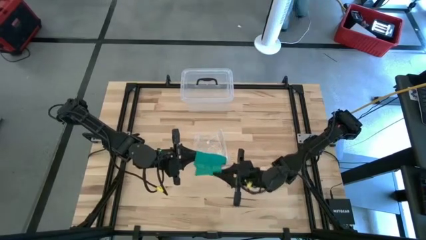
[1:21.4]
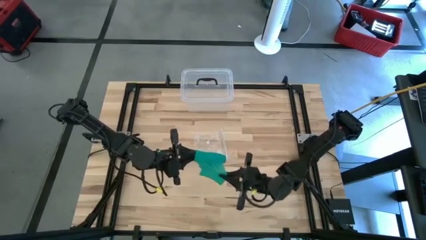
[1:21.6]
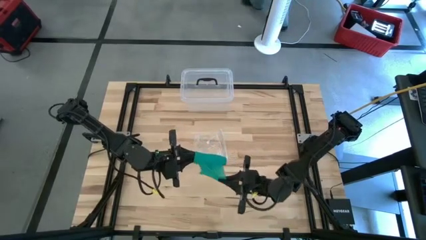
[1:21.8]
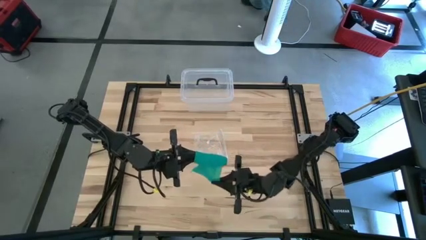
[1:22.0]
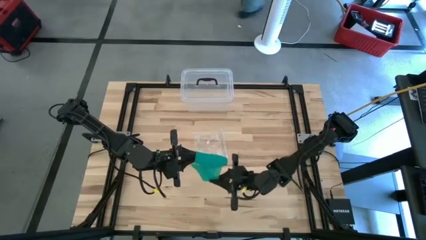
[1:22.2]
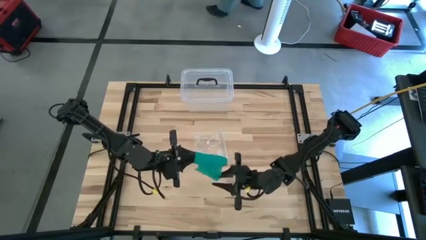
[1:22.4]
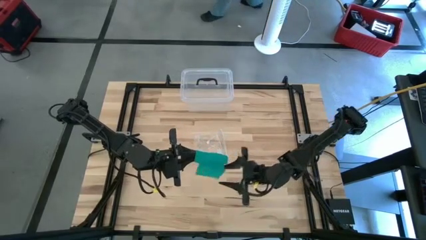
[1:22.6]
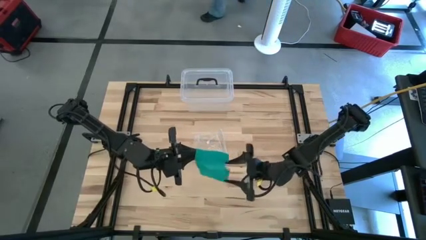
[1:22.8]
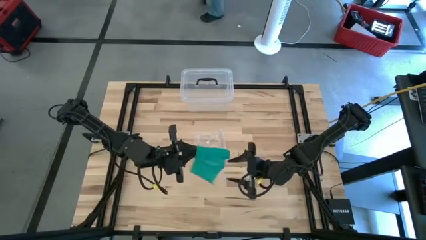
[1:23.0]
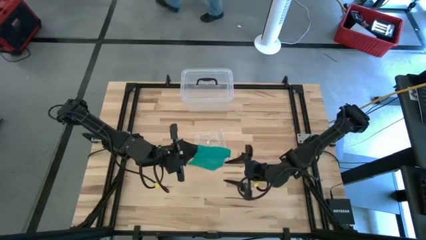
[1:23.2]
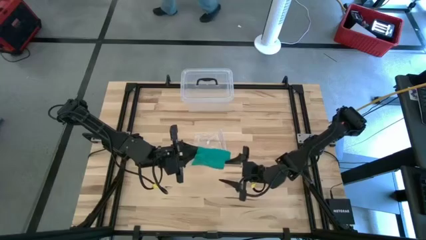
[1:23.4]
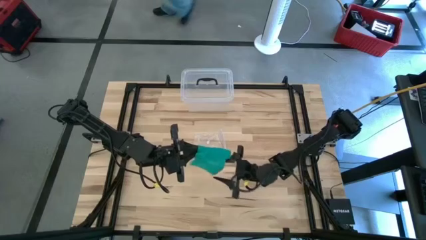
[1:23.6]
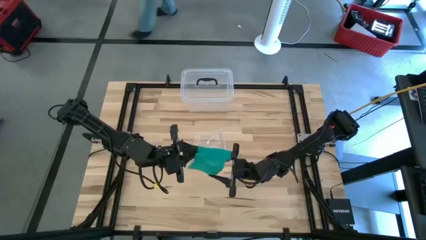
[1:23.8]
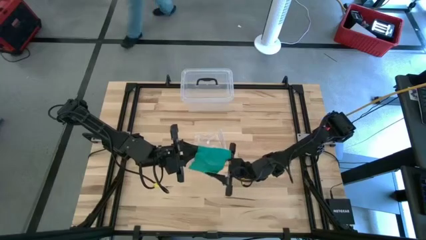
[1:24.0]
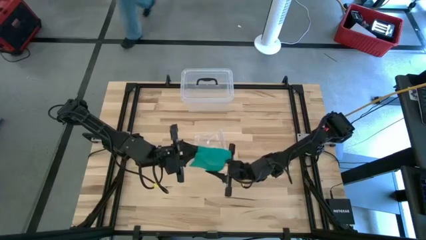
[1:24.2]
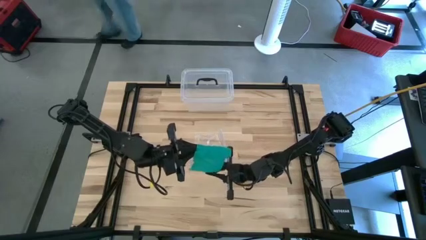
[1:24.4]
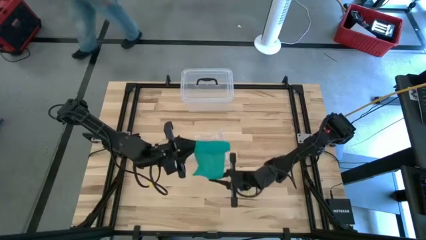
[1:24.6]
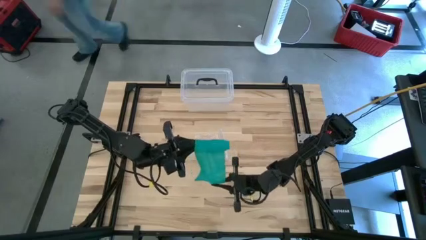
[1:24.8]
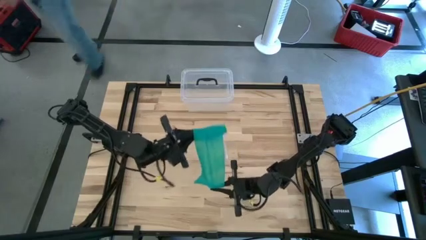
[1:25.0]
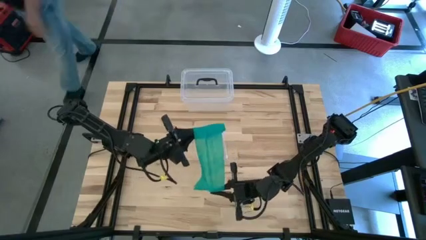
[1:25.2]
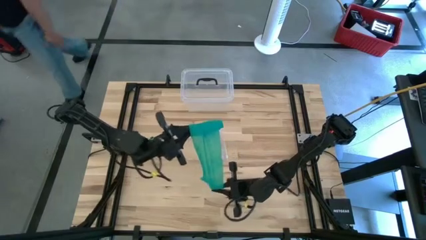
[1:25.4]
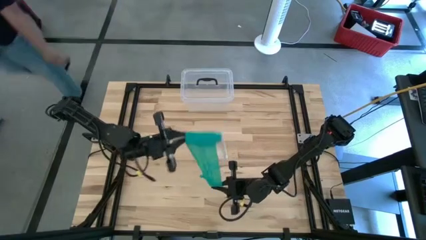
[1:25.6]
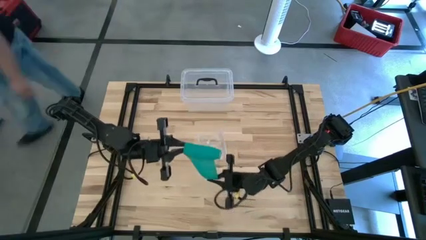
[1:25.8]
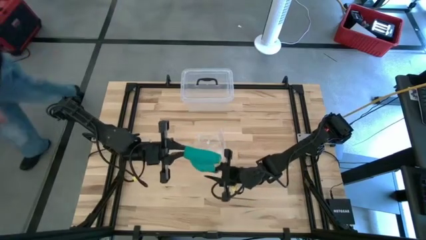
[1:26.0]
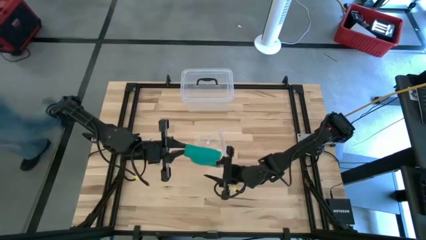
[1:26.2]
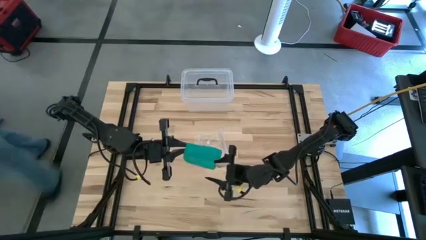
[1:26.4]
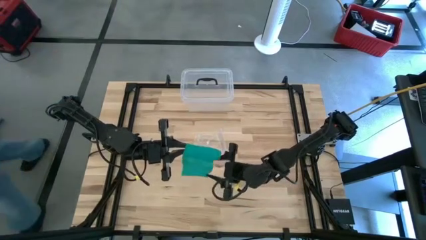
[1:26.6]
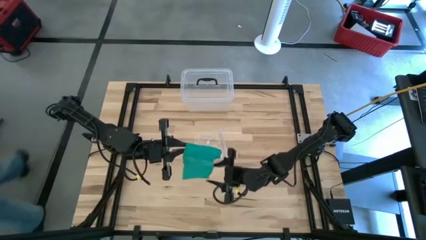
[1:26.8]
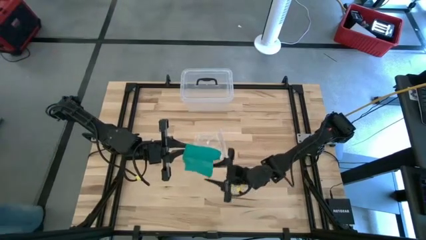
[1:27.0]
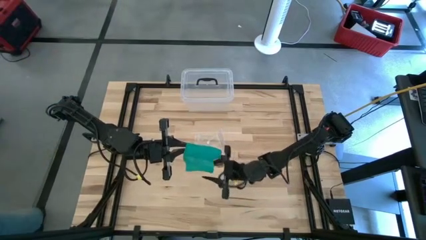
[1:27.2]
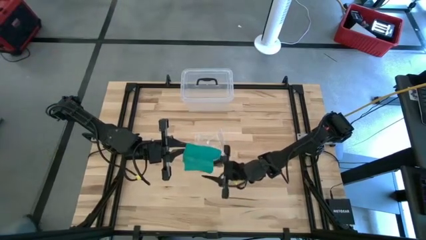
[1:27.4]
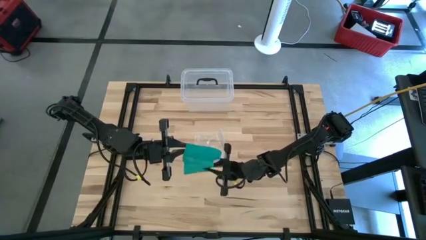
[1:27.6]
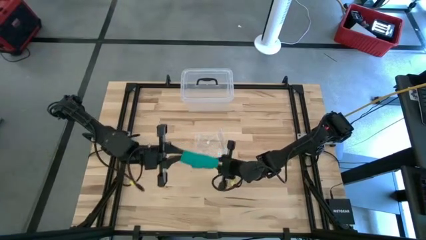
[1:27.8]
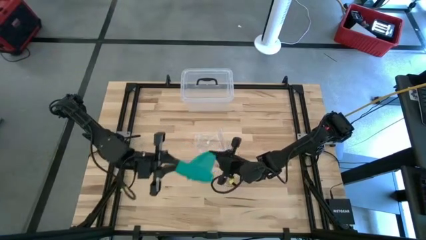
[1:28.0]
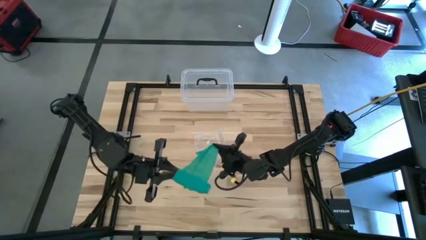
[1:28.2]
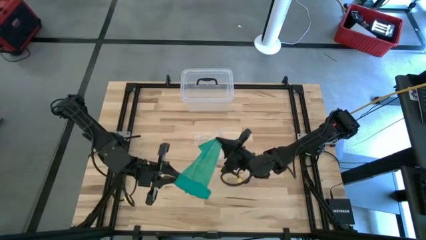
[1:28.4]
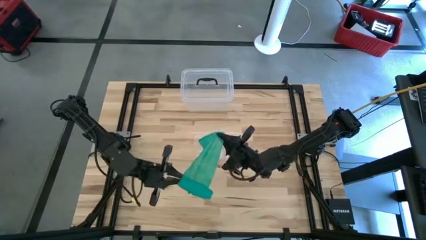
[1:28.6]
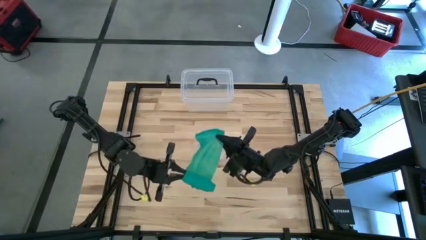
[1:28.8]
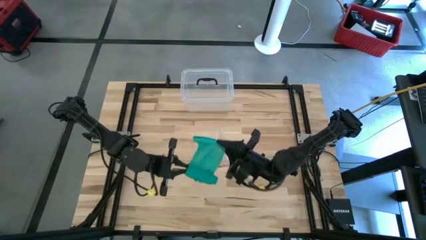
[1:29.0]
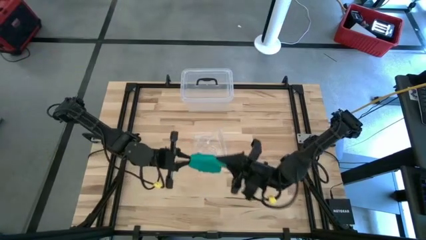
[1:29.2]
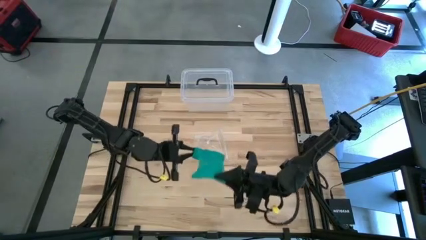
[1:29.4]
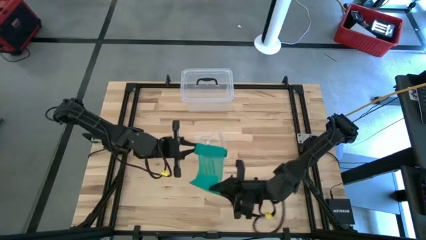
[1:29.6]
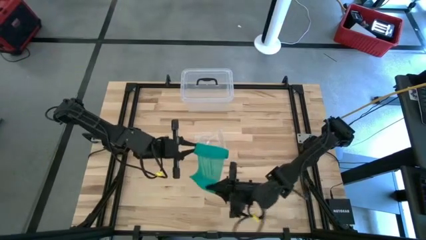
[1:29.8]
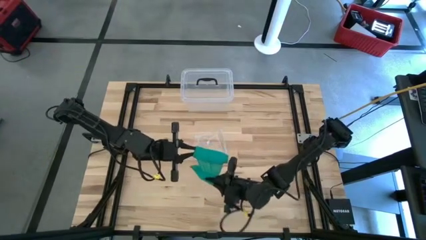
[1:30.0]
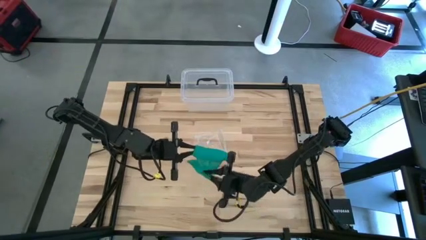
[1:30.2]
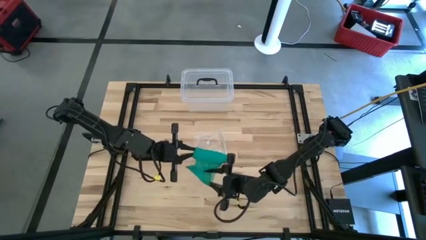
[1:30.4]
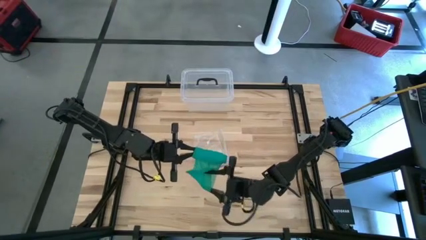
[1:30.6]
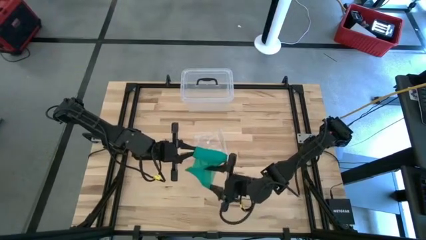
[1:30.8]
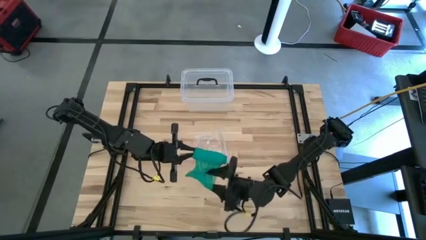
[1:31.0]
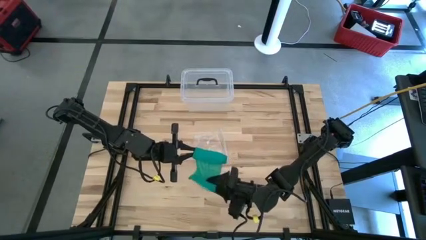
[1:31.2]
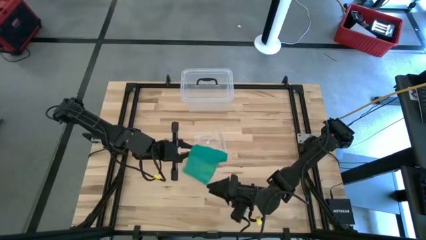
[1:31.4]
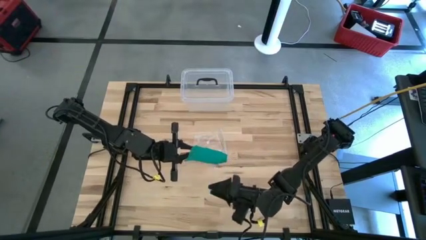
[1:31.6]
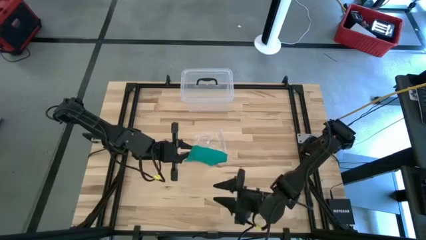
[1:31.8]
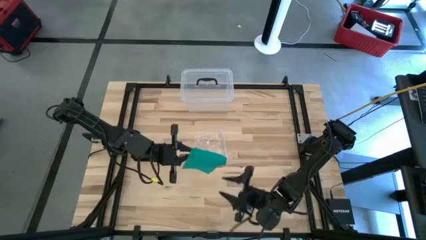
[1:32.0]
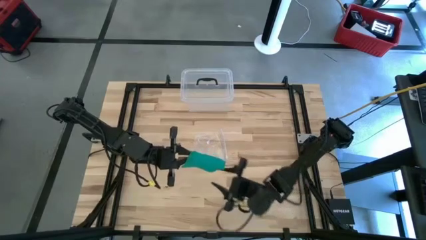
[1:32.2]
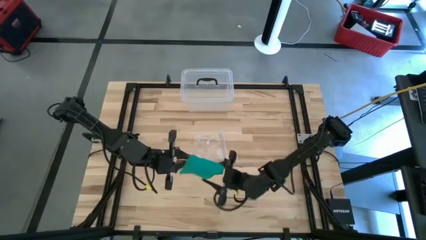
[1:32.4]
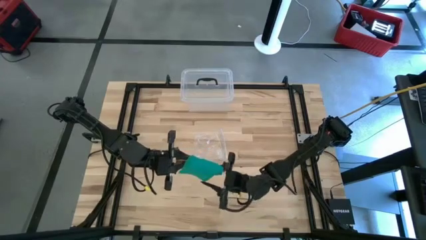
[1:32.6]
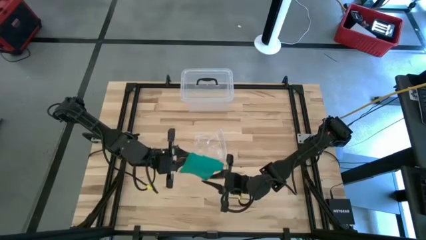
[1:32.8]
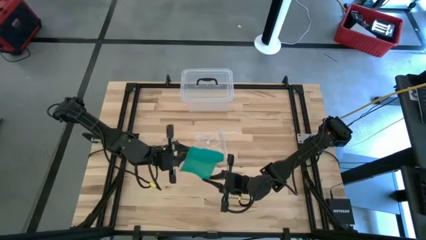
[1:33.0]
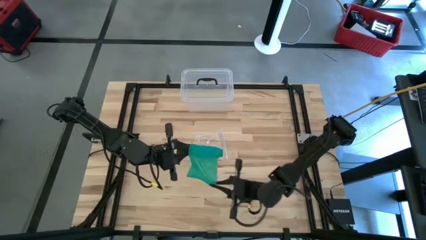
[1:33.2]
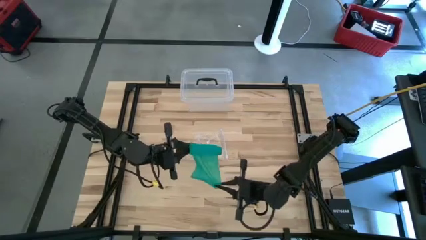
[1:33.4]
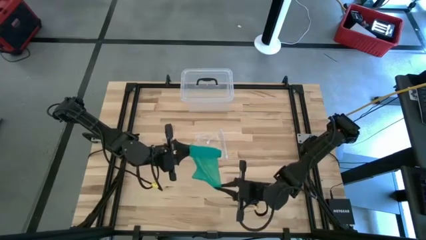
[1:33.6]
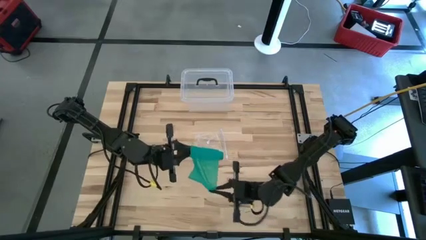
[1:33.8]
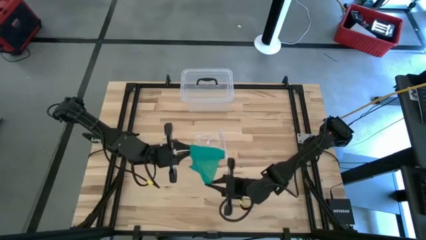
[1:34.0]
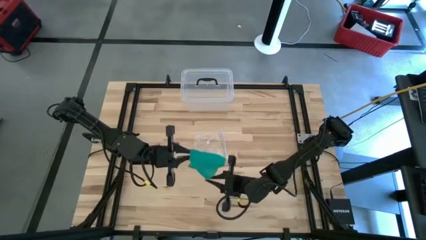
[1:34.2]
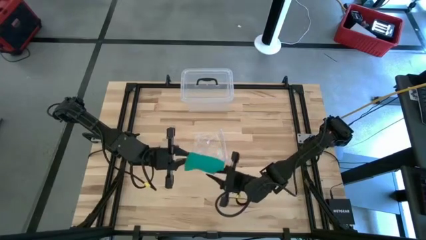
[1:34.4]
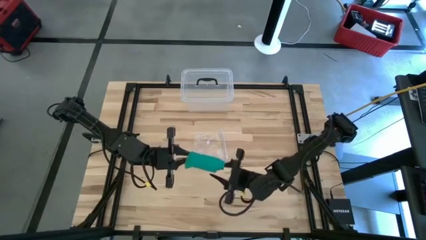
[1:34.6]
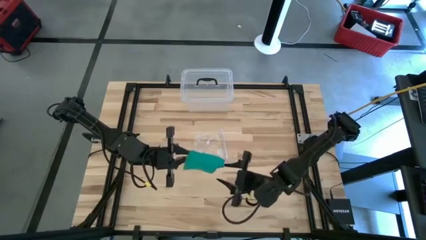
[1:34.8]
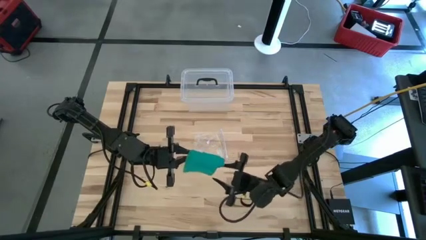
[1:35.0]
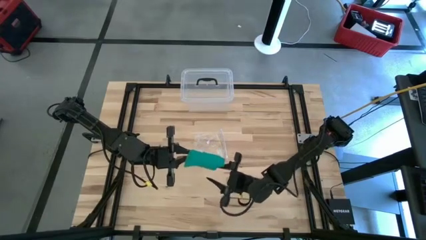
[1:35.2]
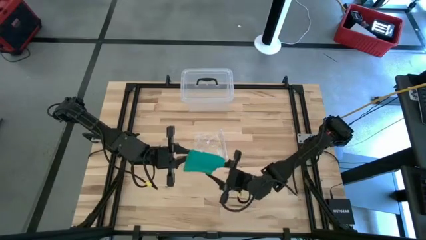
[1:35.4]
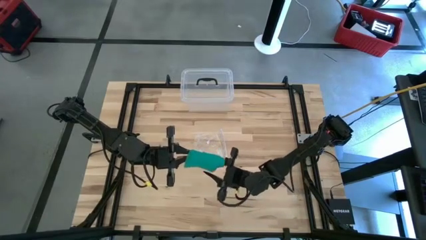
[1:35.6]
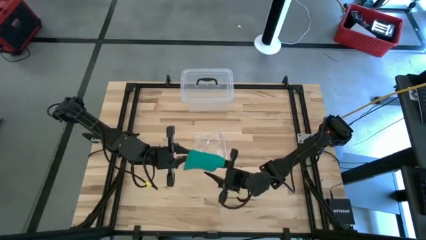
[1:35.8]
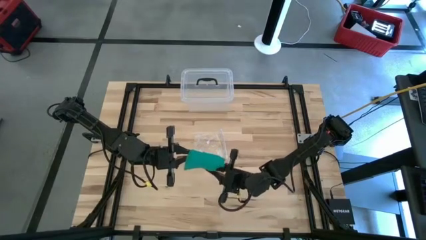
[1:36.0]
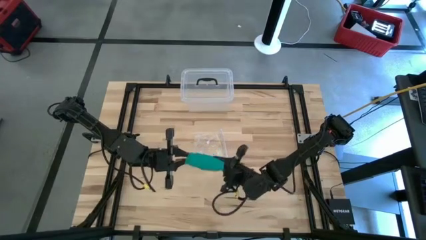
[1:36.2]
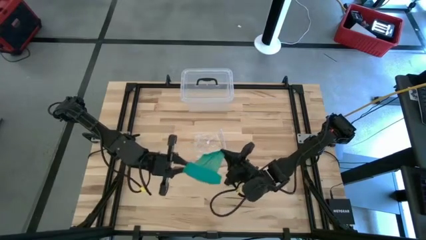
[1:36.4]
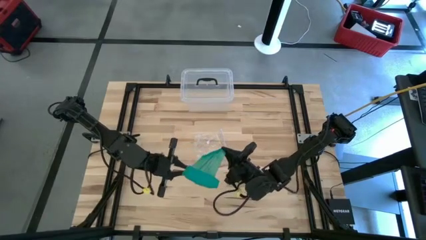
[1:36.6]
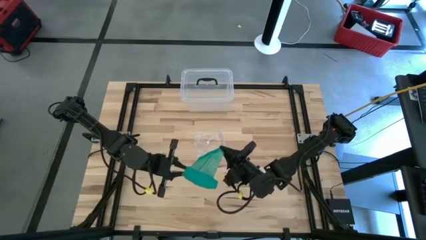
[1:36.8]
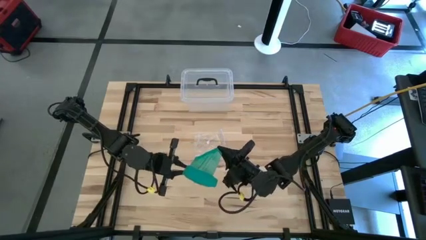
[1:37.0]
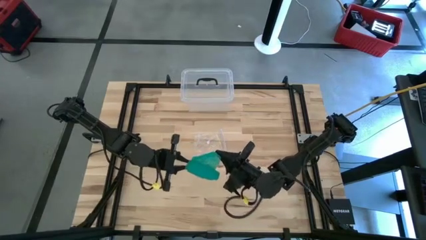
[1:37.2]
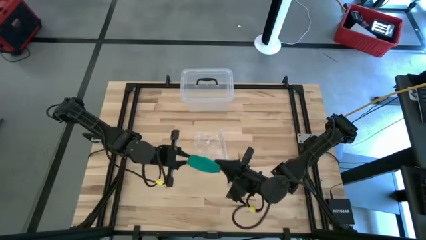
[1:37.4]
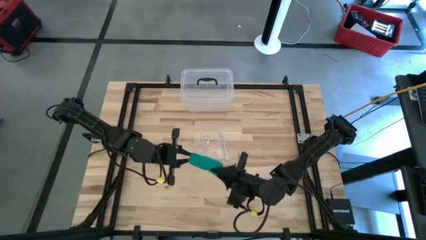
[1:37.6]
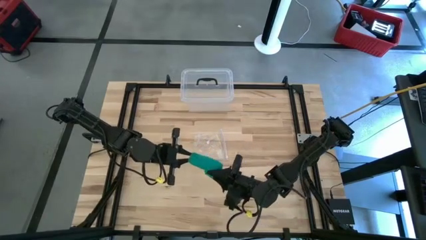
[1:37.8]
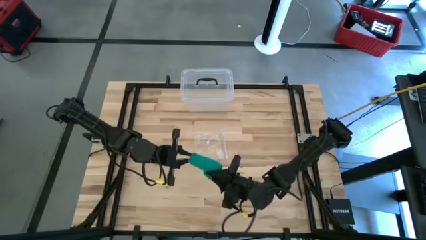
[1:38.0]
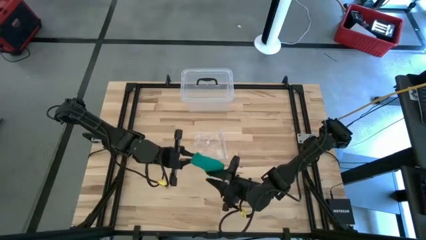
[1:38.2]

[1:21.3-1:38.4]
Task: Roll bandage
Roll the green bandage

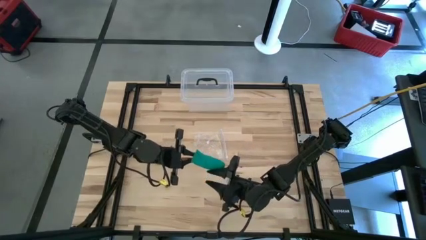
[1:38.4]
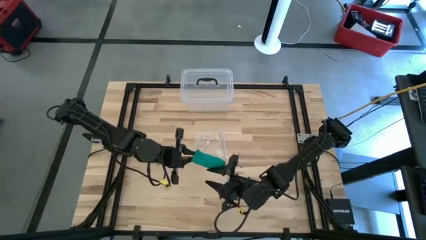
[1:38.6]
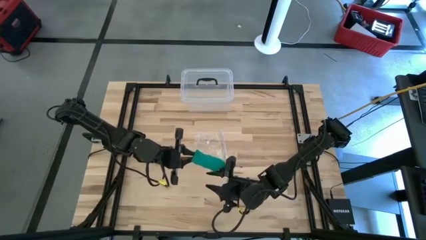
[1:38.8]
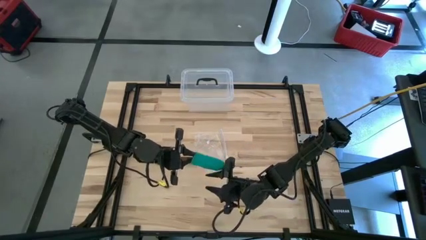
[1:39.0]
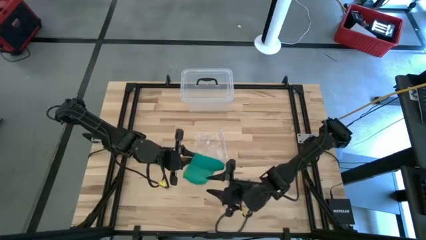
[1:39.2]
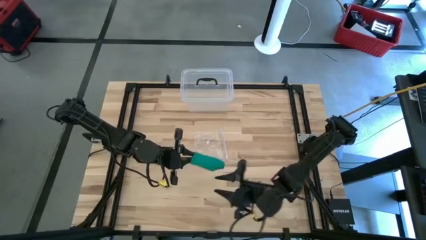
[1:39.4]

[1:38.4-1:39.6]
Roll the green bandage
